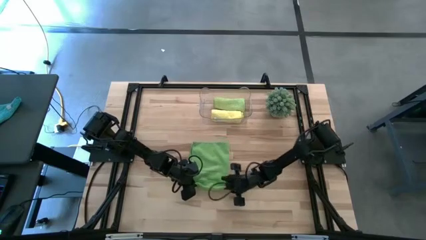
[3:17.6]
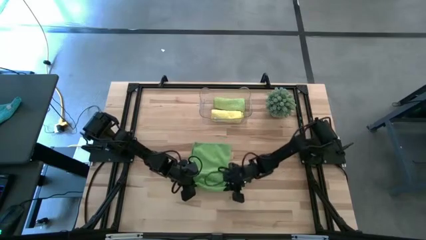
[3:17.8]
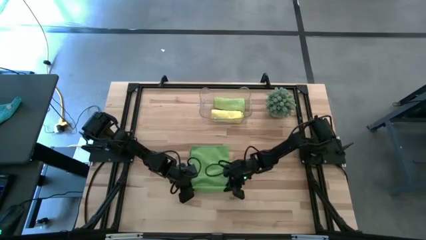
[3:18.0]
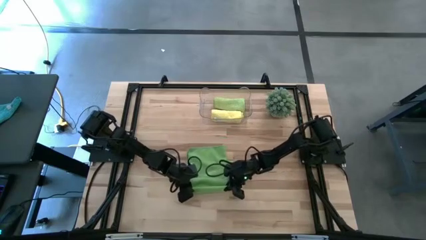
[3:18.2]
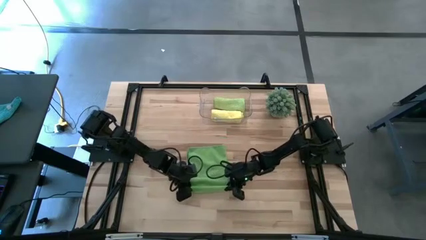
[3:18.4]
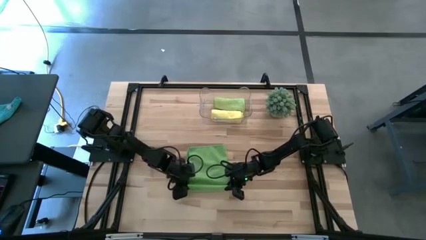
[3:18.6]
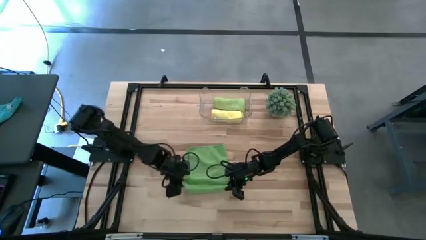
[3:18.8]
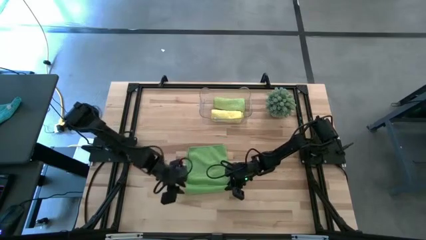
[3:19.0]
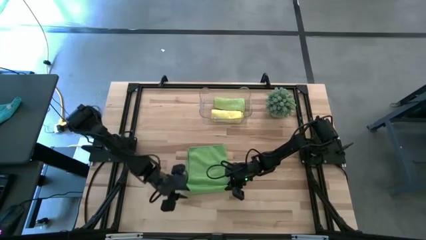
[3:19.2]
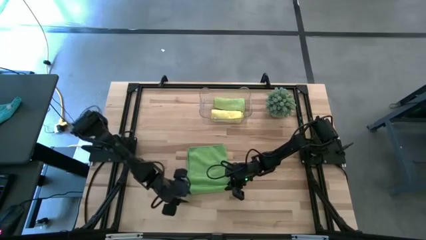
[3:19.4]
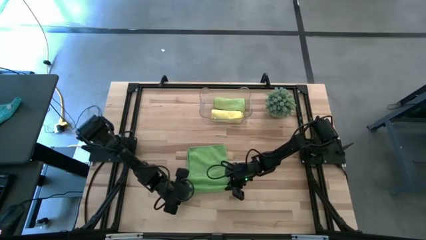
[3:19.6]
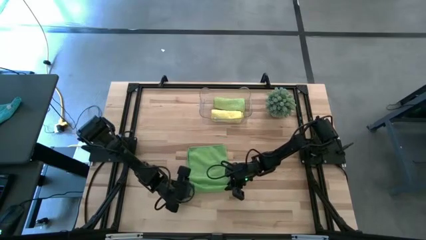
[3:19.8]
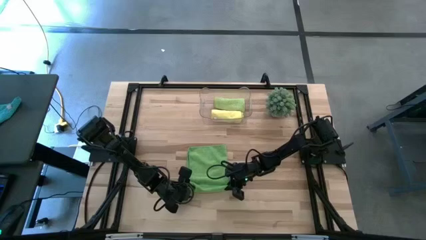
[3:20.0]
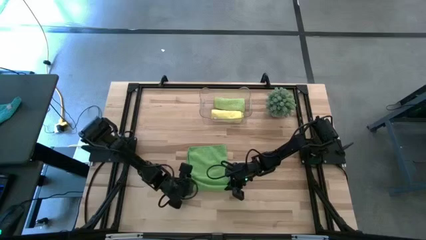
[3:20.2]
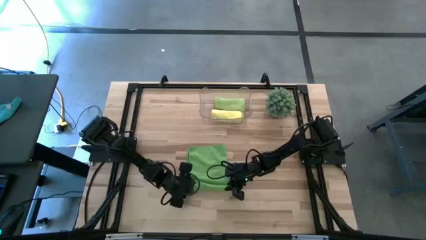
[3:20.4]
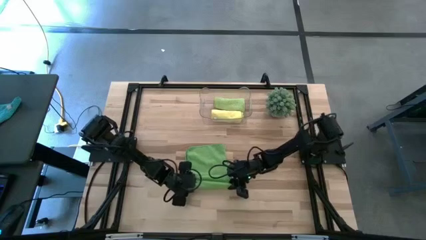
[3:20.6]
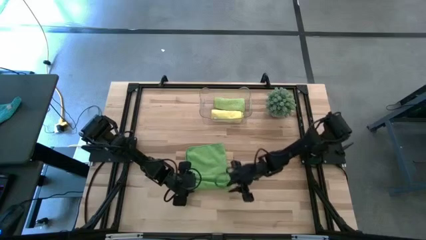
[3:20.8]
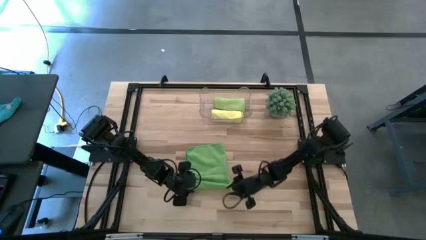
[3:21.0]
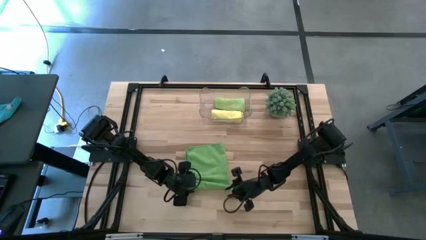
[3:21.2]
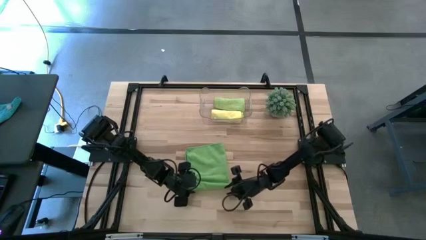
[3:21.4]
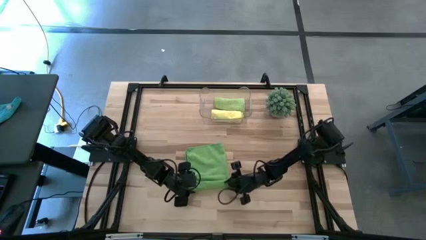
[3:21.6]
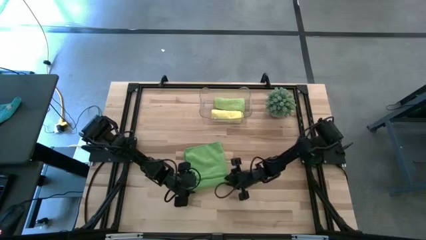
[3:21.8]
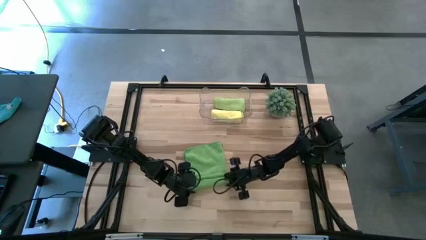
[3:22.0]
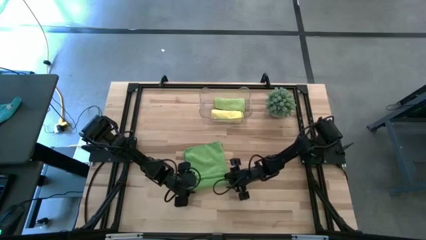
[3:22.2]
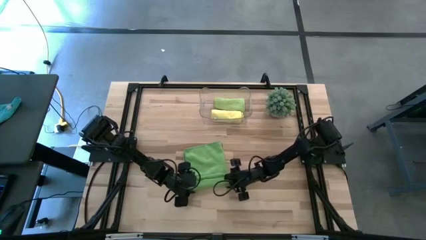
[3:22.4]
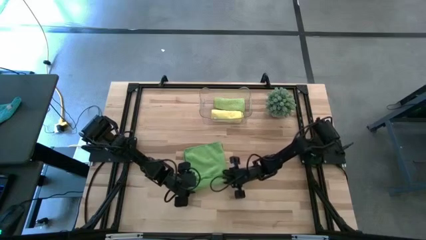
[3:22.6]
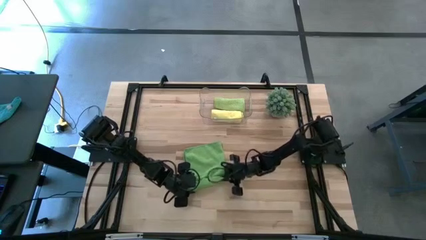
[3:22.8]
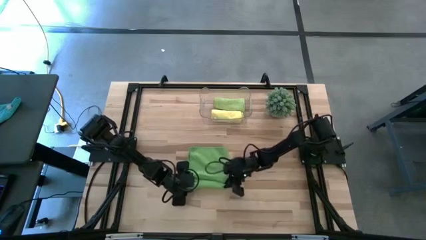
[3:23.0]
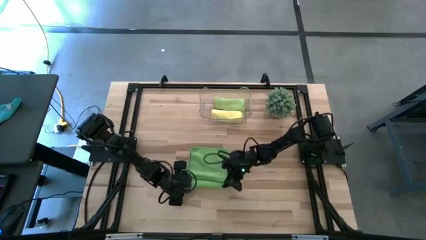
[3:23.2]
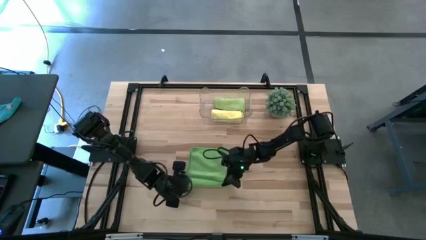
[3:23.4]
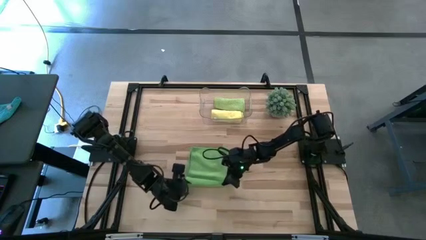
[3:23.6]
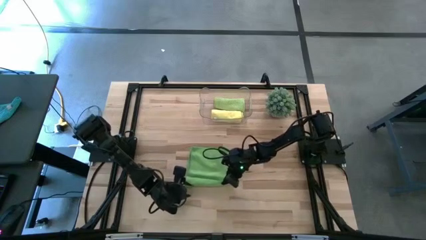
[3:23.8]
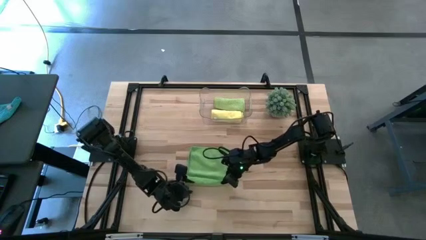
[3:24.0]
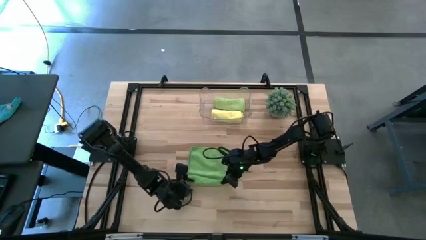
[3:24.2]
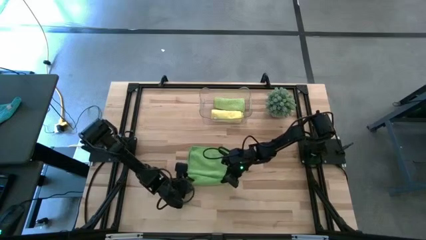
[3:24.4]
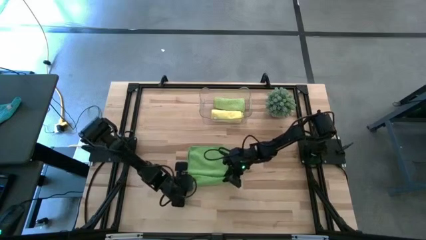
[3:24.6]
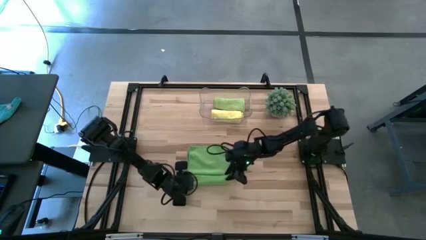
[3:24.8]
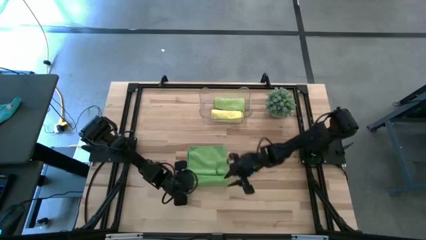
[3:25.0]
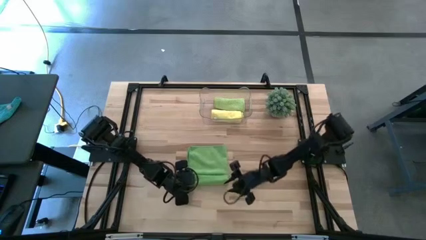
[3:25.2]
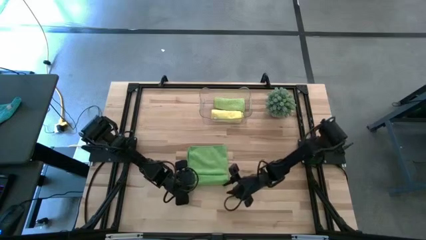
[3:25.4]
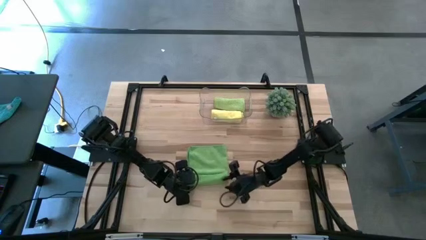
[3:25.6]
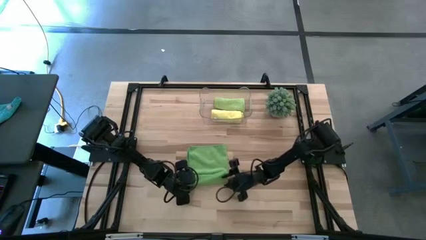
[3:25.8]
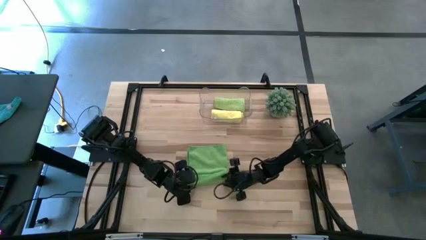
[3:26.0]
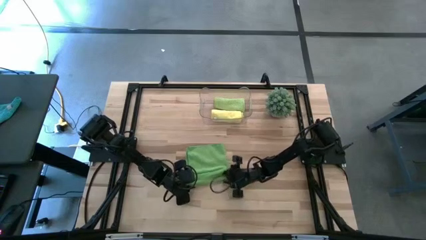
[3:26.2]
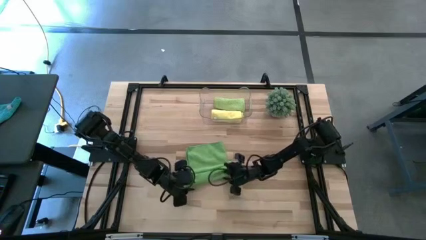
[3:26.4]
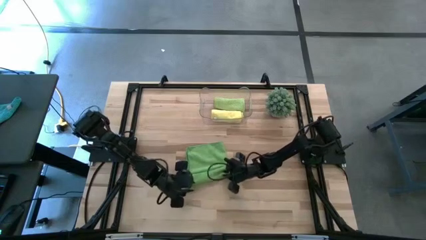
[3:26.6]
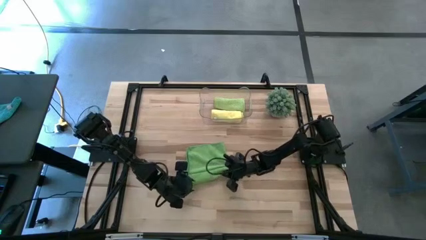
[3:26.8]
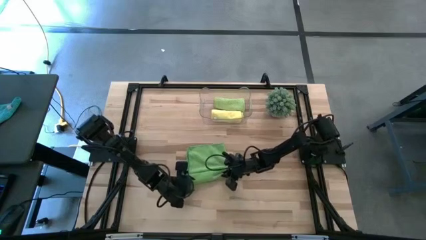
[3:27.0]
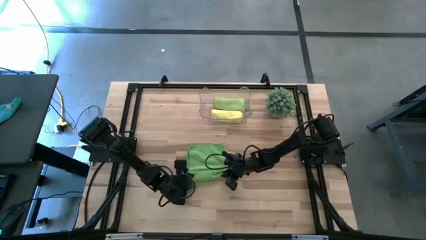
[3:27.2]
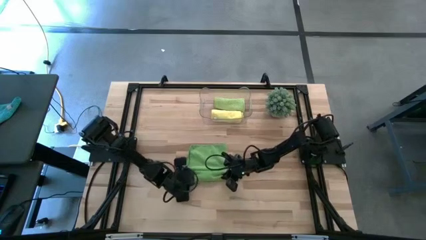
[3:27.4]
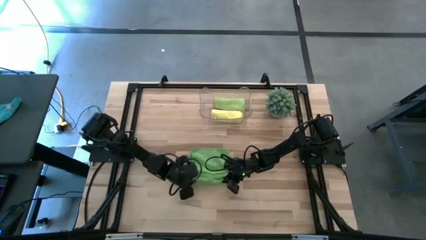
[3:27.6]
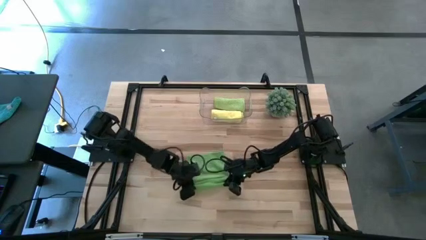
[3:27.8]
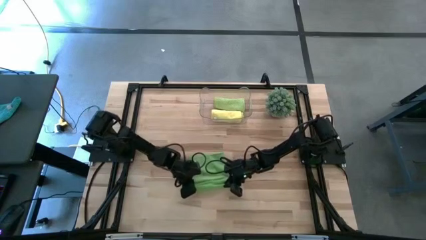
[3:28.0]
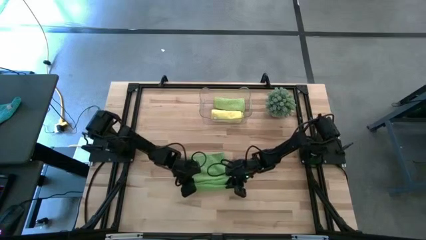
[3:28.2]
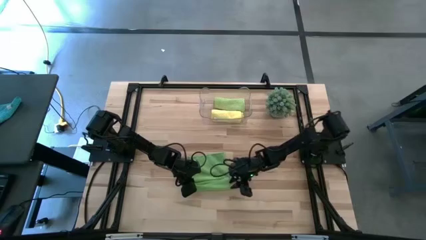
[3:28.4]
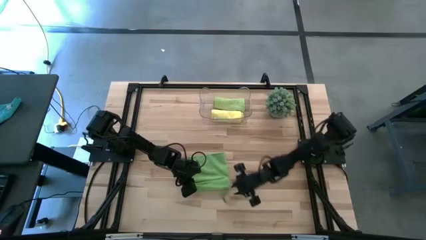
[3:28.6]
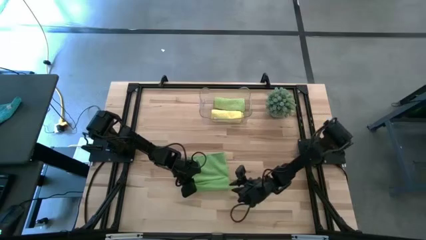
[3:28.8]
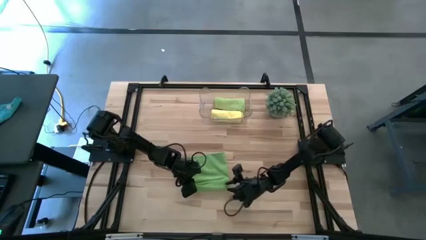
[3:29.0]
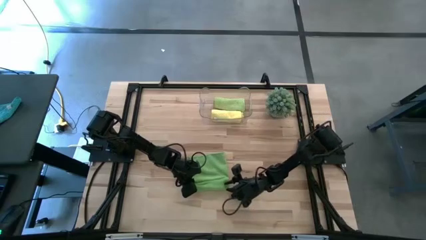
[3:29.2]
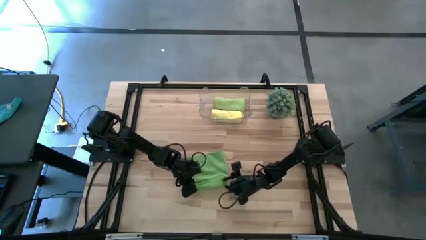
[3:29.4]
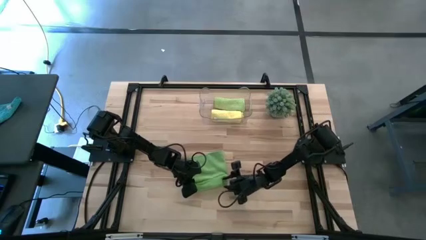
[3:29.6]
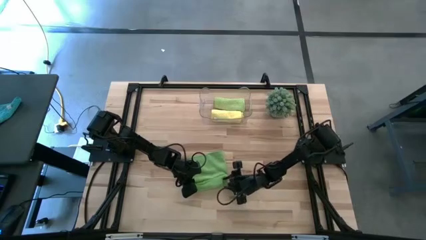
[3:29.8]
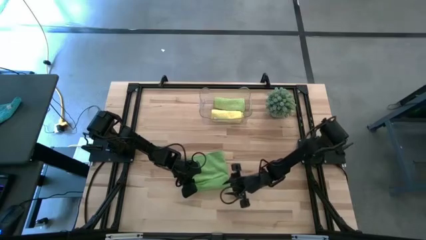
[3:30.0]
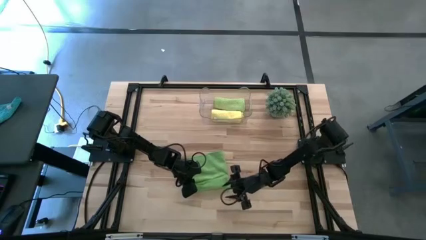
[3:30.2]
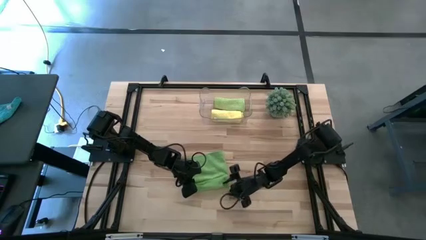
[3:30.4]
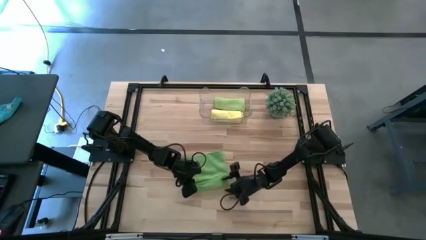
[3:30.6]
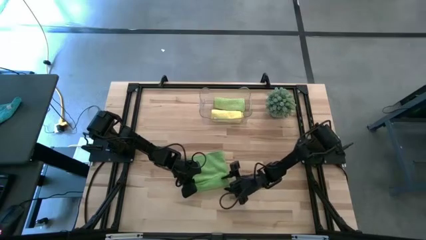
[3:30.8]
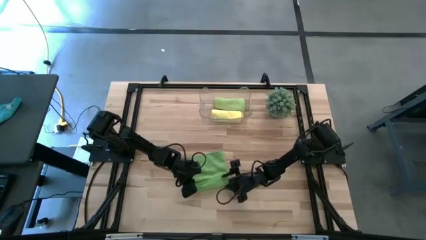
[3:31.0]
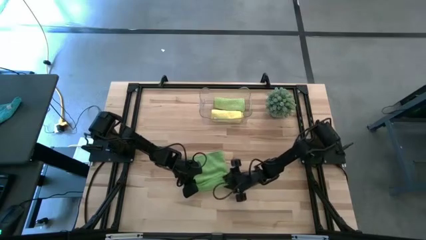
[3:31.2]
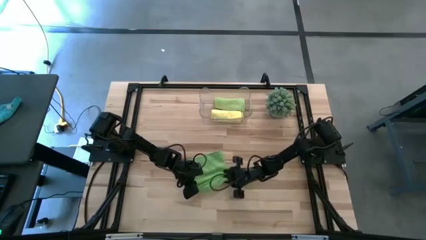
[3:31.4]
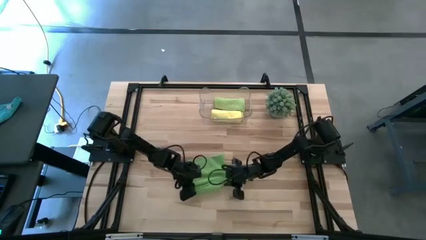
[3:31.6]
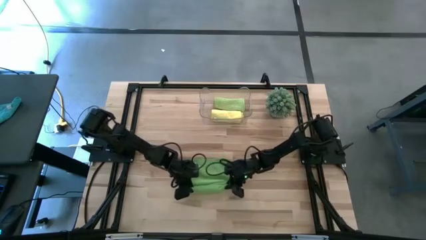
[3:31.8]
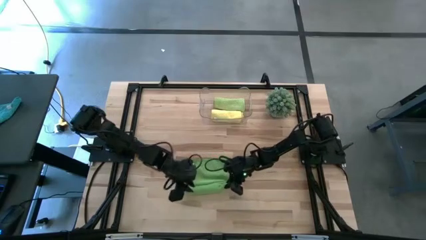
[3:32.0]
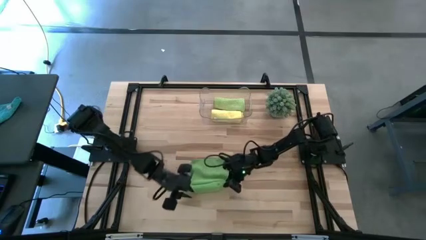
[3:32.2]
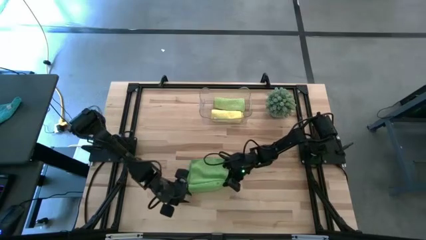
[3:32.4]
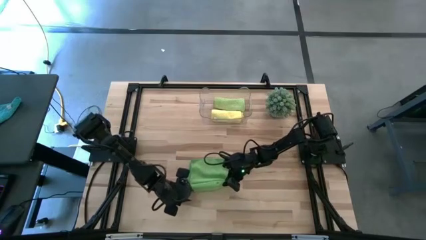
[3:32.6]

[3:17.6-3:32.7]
Task: Roll microfiber towels into tight, uniform cylinder then place into a basket
Roll the green microfiber towel
